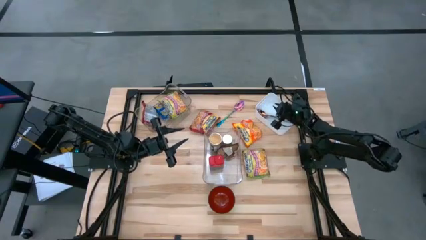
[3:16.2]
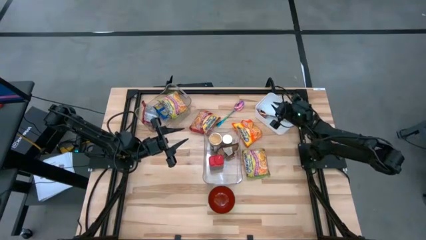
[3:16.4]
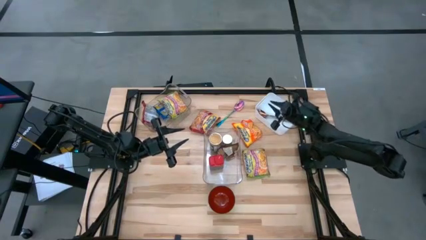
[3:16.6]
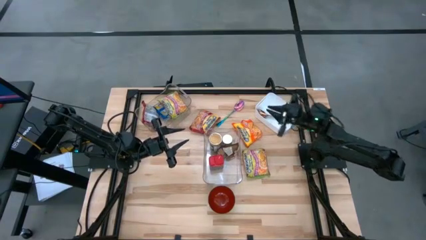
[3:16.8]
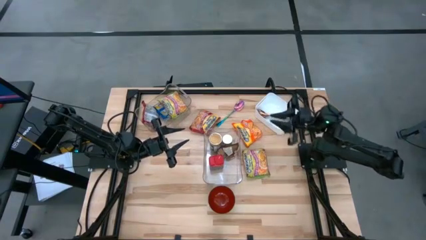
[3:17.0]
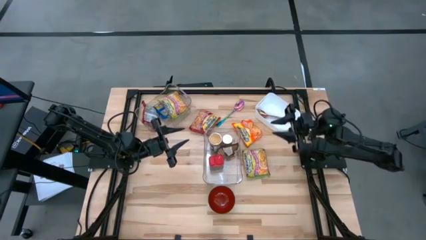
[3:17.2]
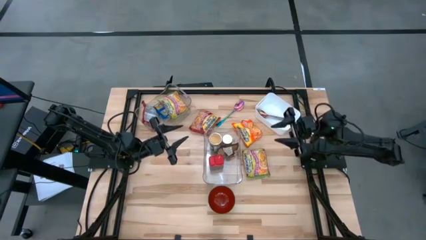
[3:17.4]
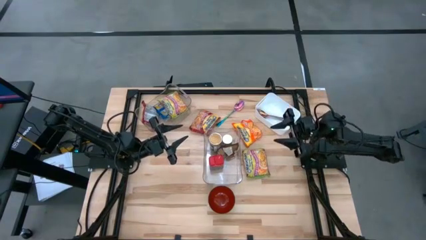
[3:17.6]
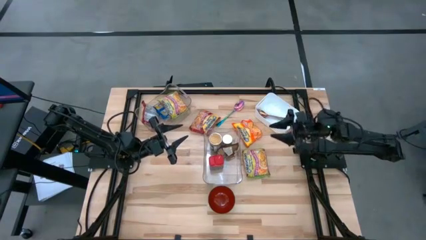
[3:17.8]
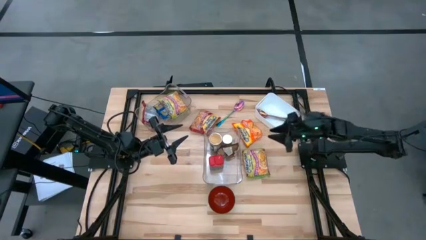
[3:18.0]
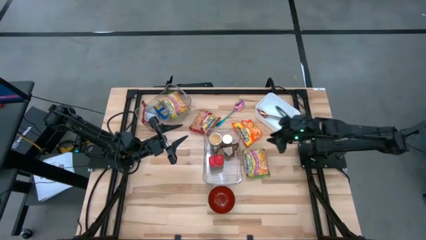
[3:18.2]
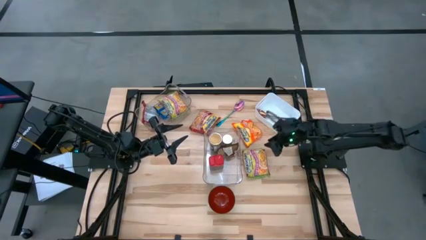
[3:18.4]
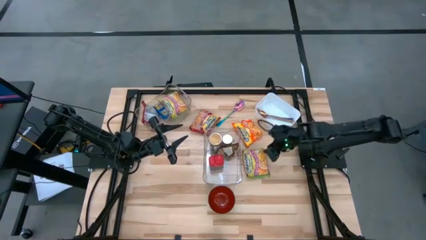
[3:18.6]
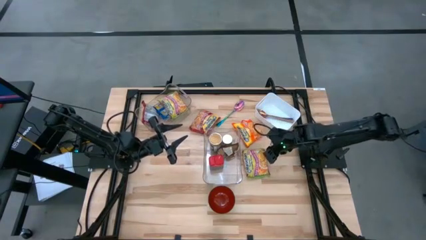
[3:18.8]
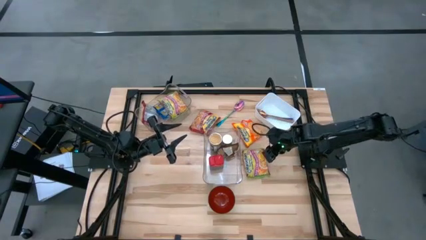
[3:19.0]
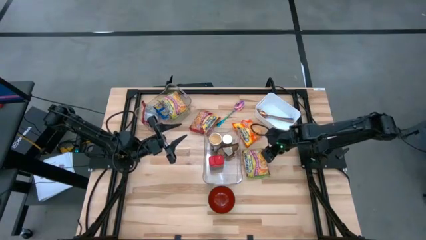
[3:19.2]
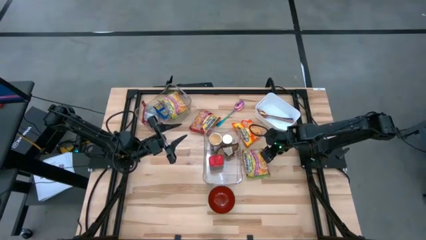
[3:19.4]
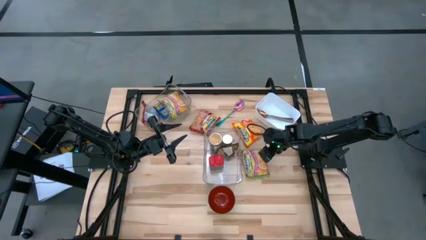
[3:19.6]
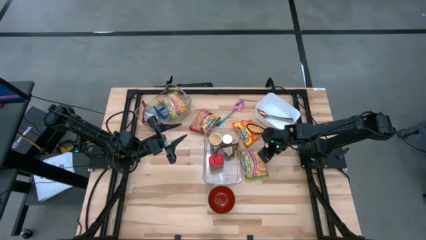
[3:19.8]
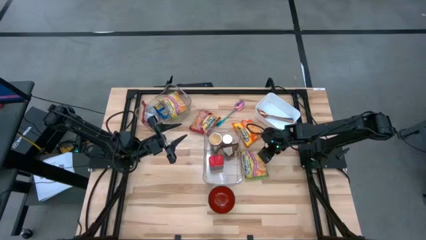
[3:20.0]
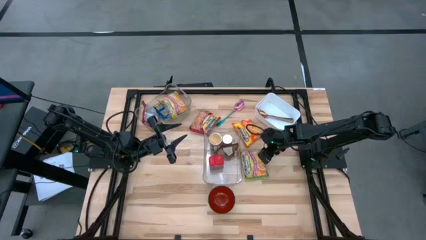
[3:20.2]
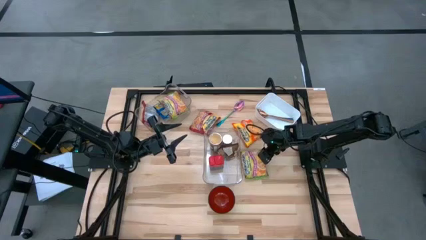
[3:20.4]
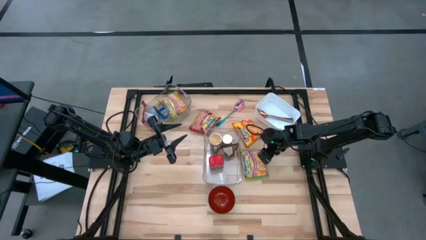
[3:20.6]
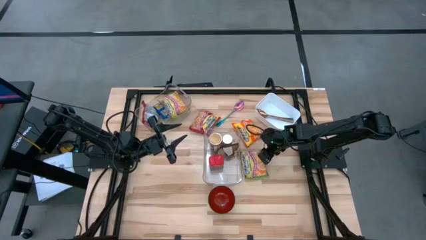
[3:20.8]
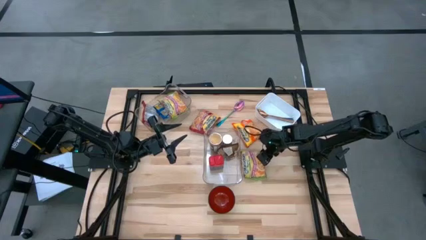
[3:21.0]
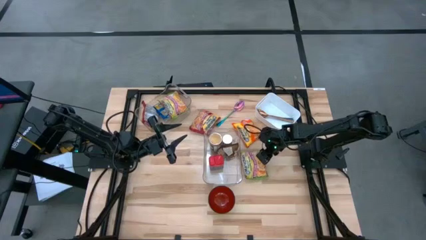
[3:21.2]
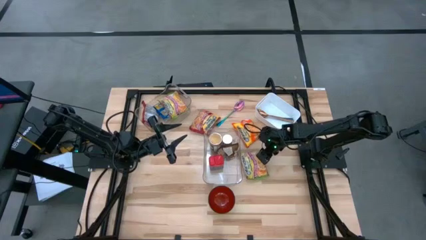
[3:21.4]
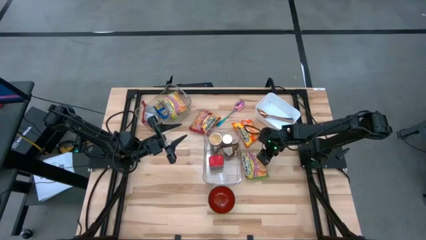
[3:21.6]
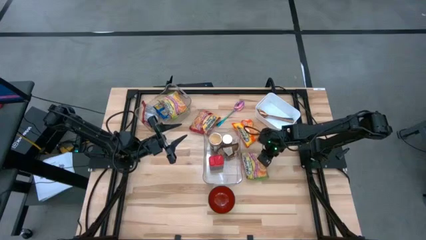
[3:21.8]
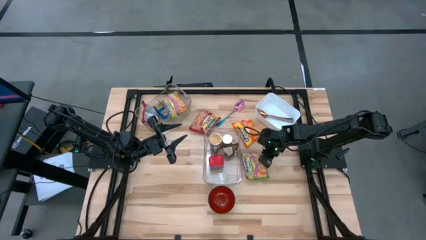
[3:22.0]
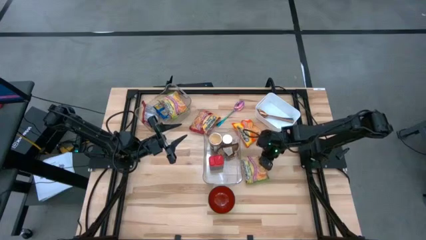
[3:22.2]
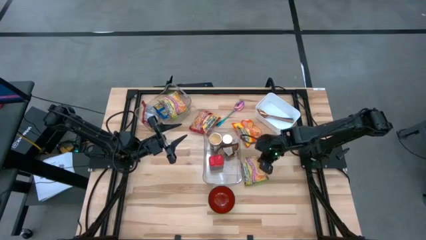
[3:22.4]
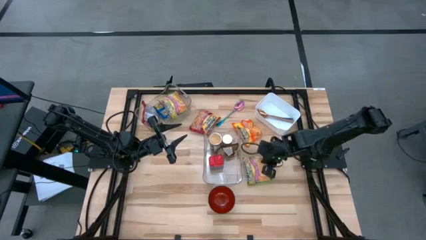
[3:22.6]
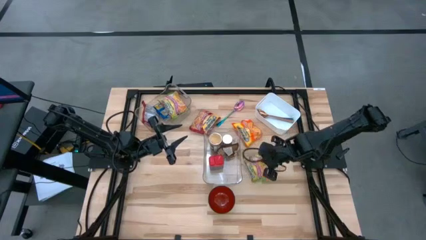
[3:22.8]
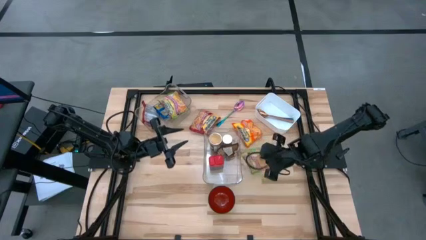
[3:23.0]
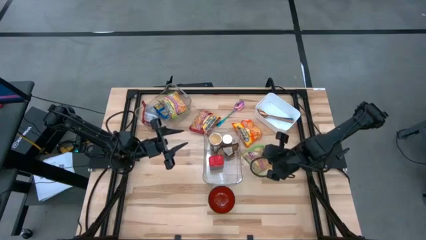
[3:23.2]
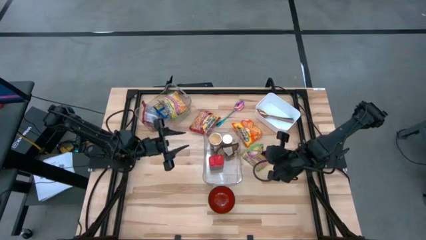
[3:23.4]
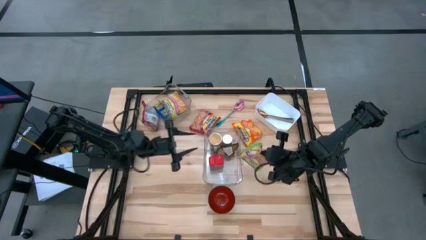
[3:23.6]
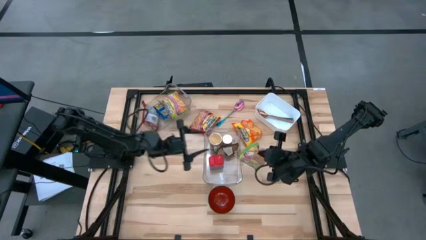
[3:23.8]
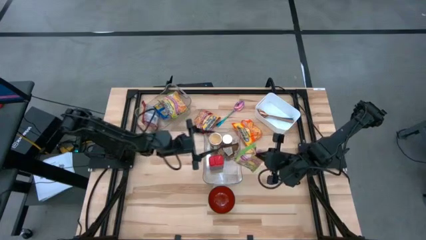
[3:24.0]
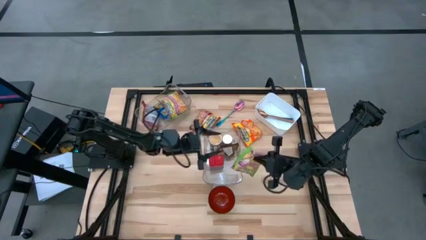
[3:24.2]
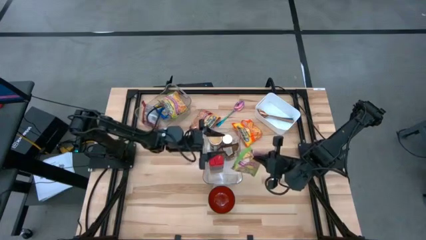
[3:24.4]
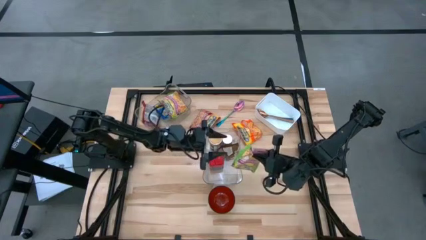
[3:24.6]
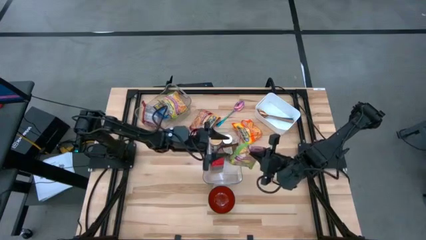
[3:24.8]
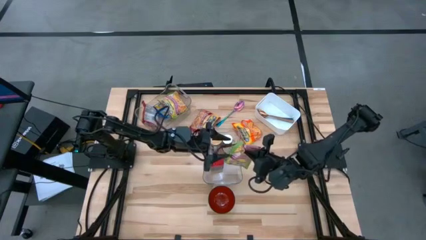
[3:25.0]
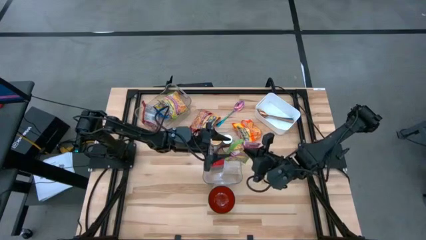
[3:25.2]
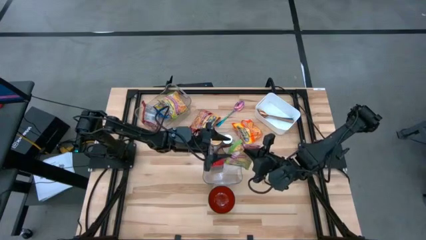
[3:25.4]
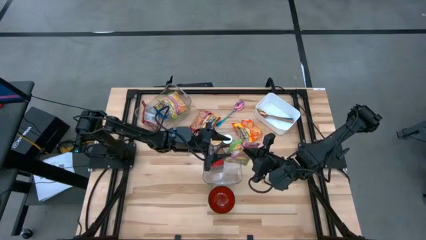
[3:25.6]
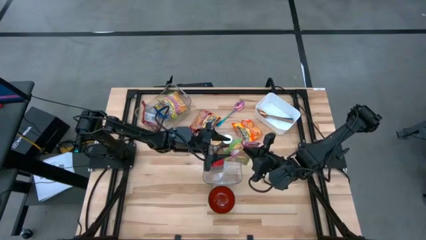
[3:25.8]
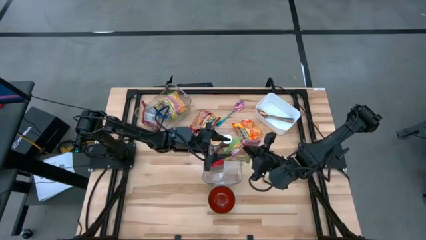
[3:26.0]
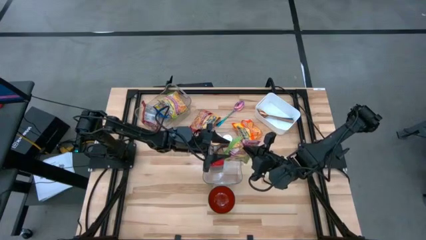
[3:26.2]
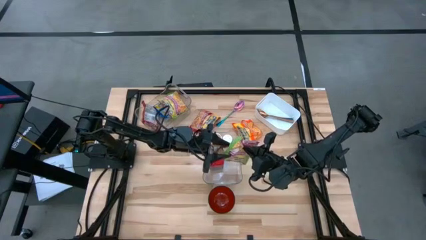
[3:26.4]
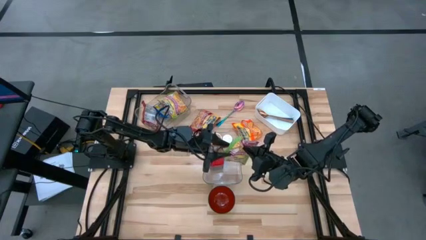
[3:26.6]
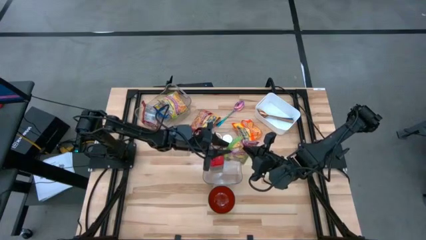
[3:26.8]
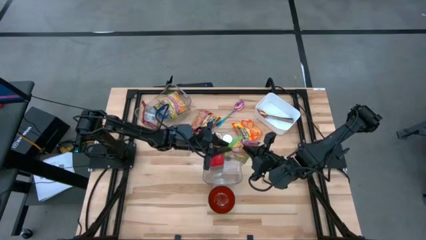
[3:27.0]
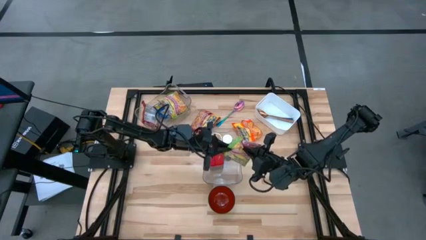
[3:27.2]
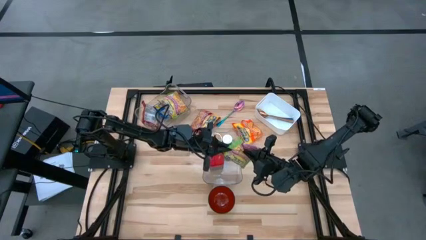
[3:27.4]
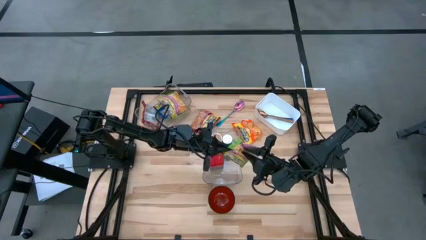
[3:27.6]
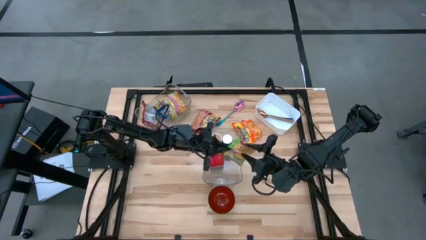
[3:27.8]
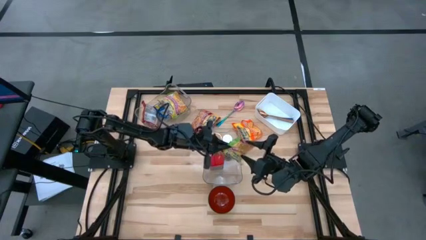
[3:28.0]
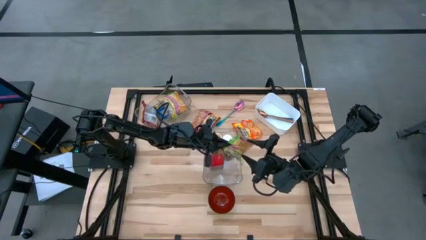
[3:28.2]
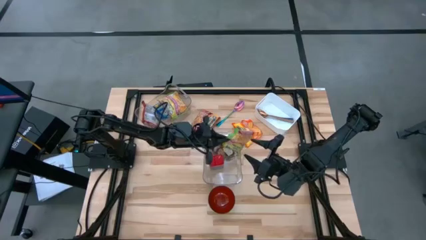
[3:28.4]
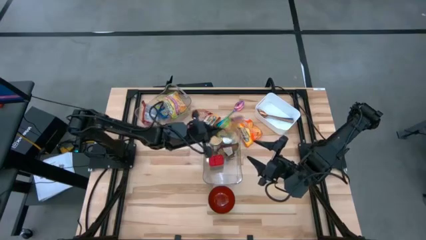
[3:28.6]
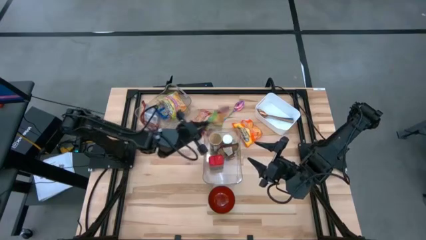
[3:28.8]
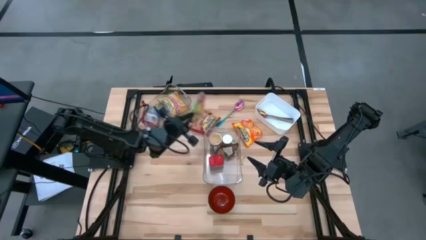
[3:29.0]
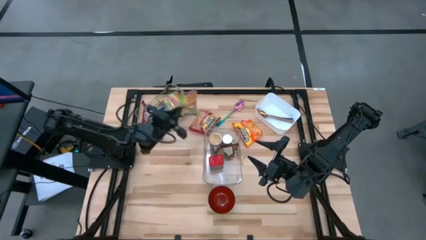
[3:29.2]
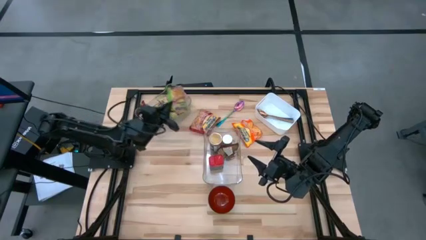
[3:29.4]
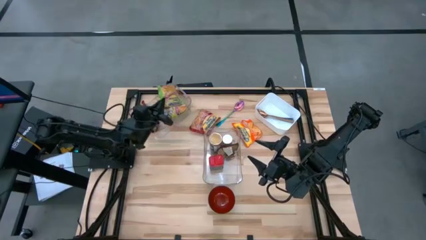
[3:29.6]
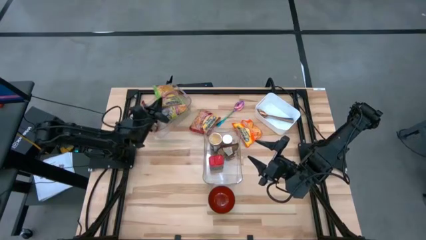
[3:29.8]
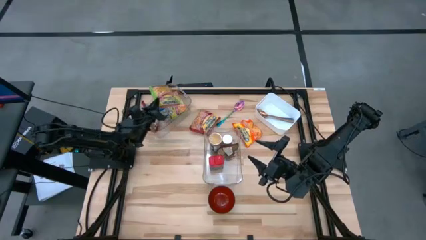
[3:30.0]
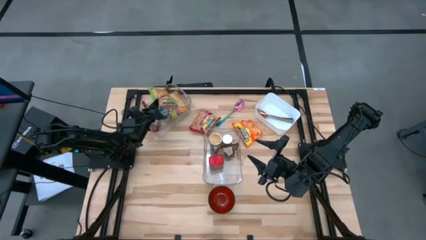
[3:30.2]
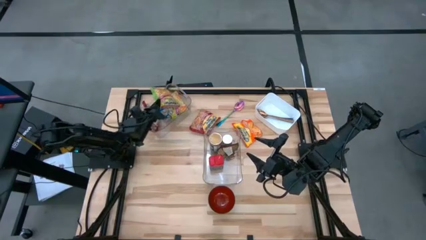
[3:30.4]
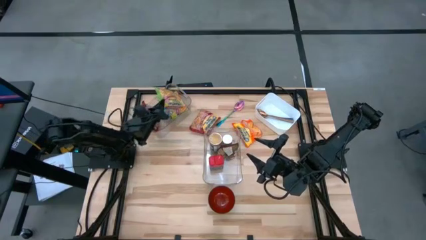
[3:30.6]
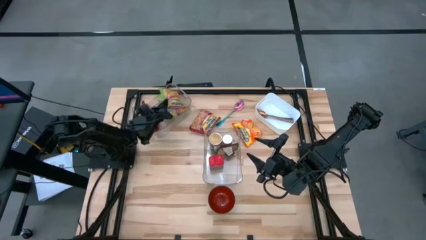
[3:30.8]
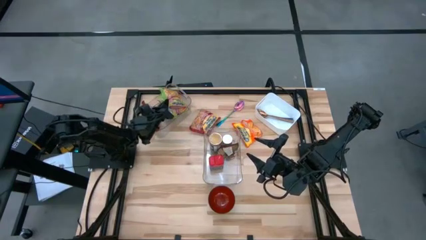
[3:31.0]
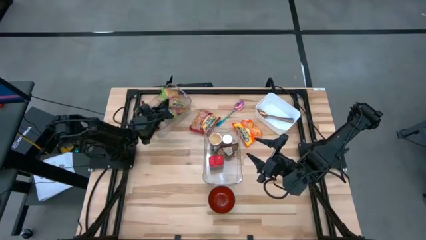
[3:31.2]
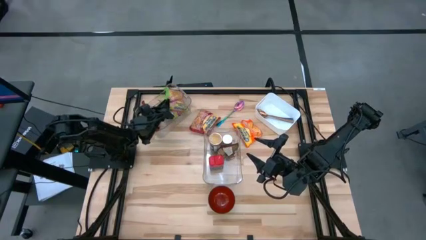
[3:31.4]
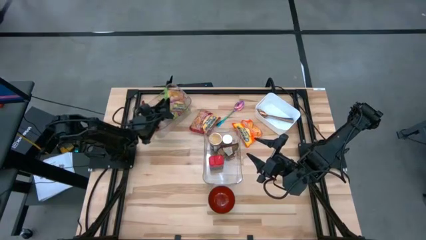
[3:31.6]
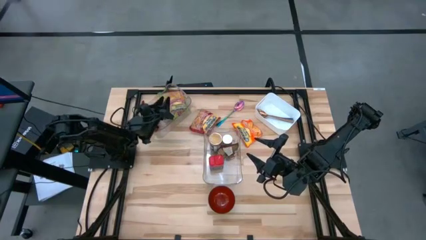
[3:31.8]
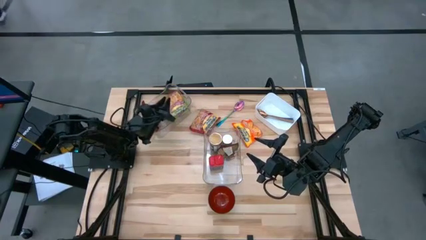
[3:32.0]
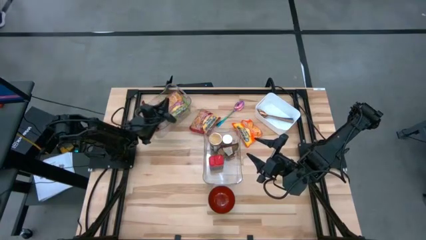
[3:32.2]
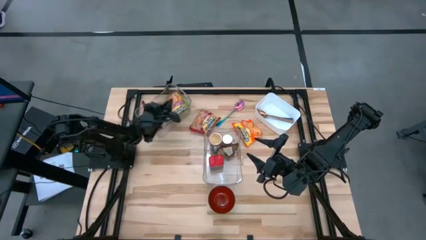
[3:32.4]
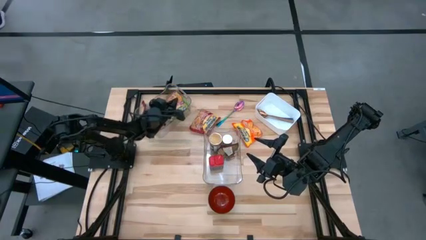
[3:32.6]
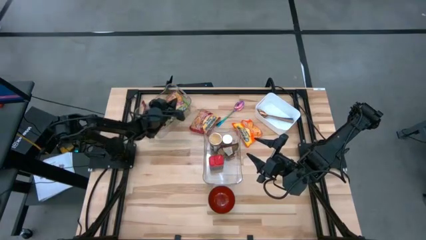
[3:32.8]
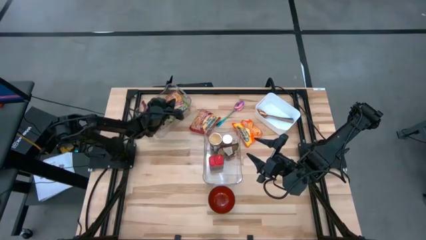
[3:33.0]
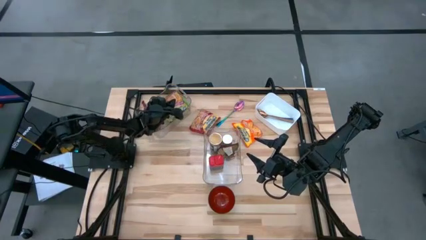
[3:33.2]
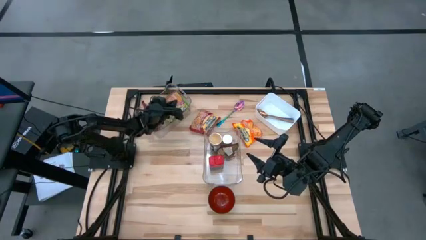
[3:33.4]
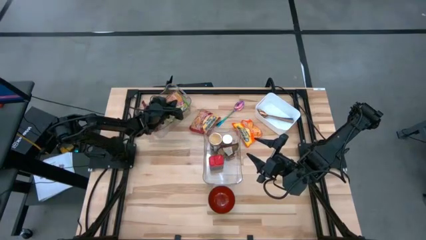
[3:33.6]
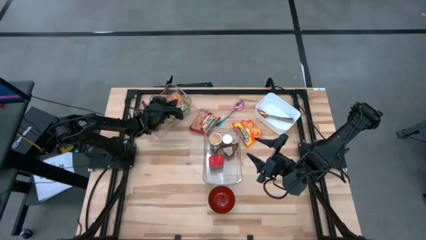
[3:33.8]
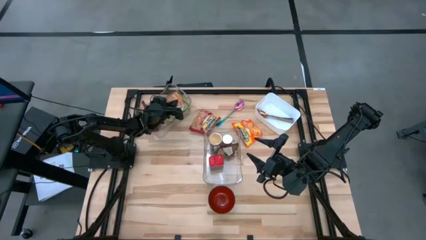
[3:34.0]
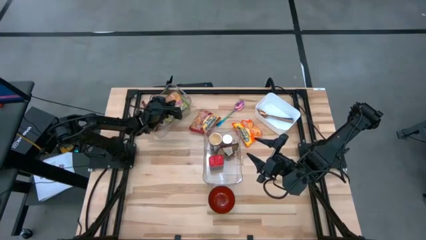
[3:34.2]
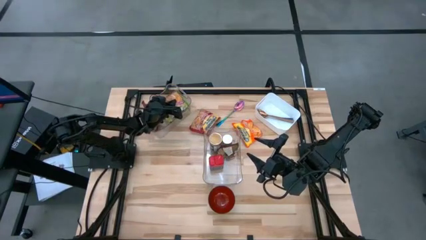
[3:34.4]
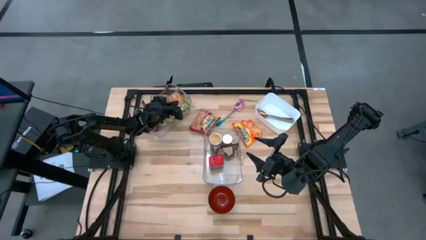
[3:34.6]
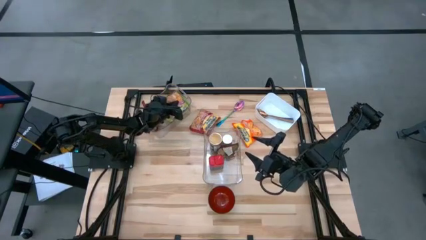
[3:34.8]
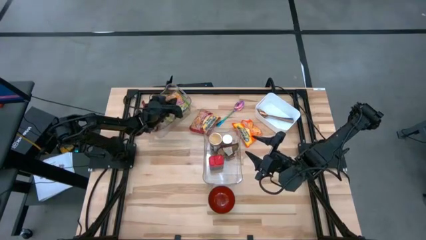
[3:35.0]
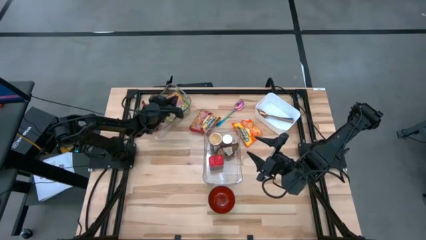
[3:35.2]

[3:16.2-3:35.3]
Task: Pick & Place Food Item
Put the green noodle pack into the top transparent bin
